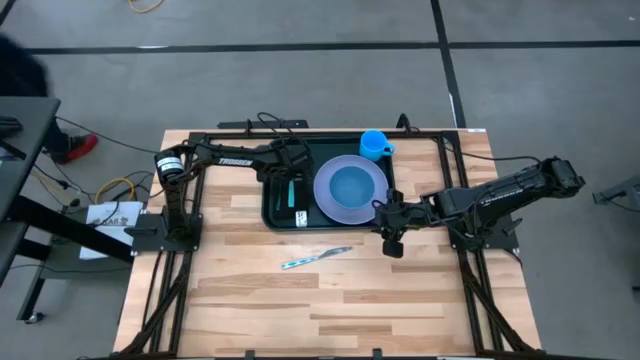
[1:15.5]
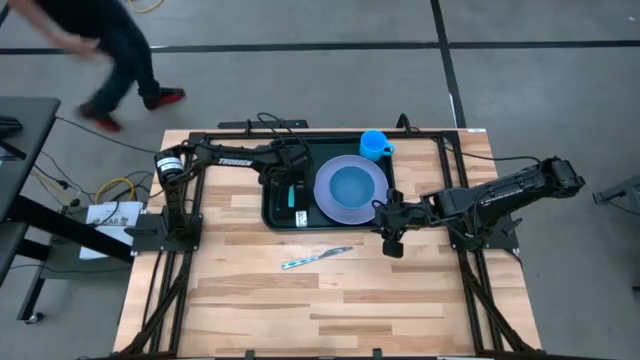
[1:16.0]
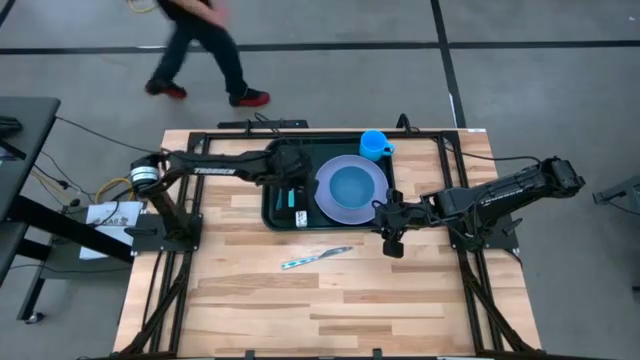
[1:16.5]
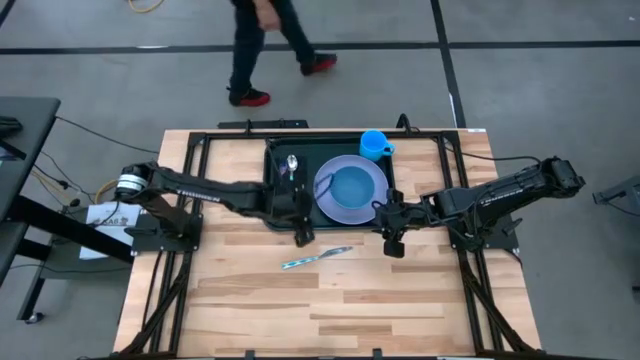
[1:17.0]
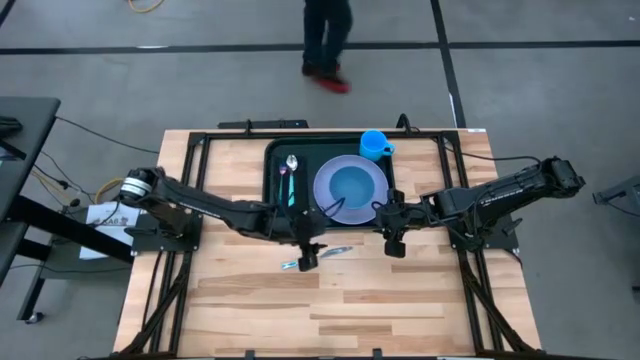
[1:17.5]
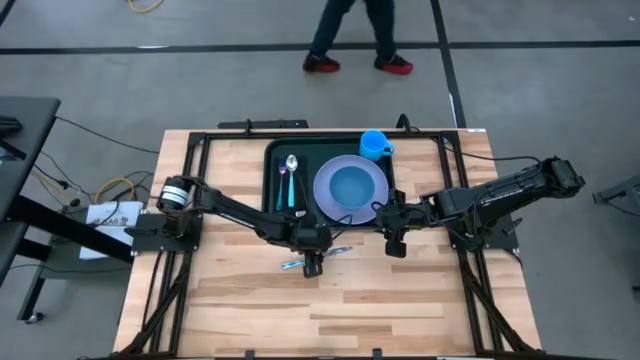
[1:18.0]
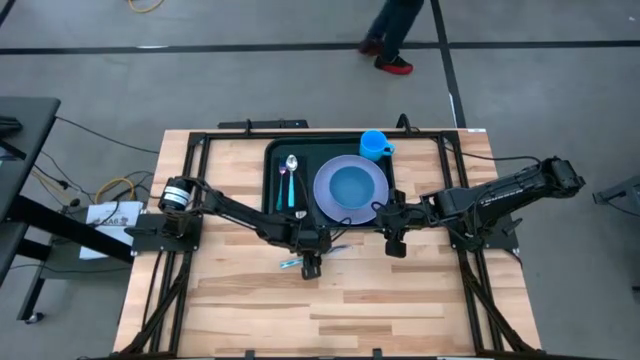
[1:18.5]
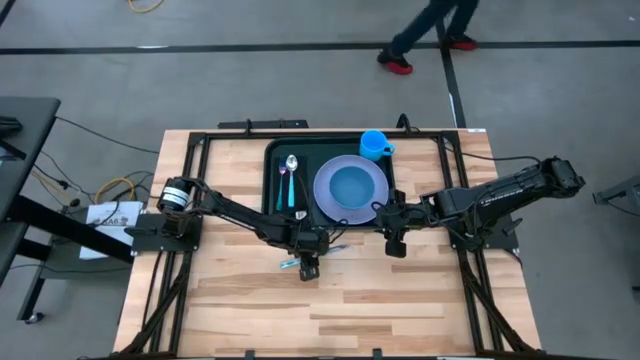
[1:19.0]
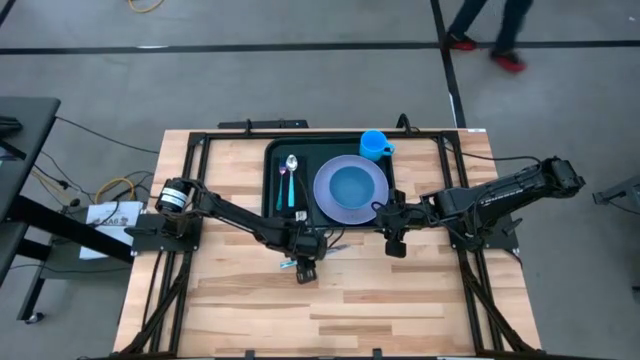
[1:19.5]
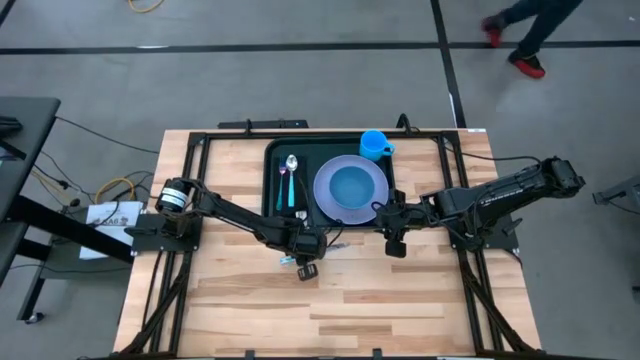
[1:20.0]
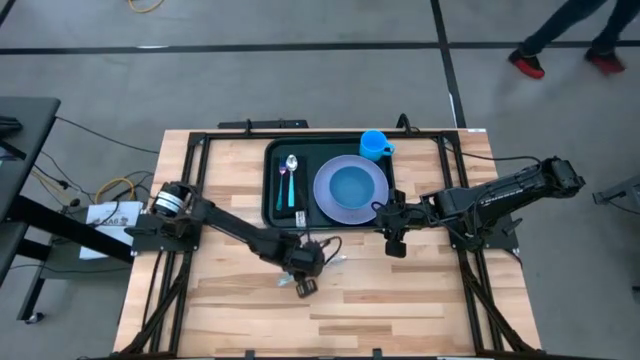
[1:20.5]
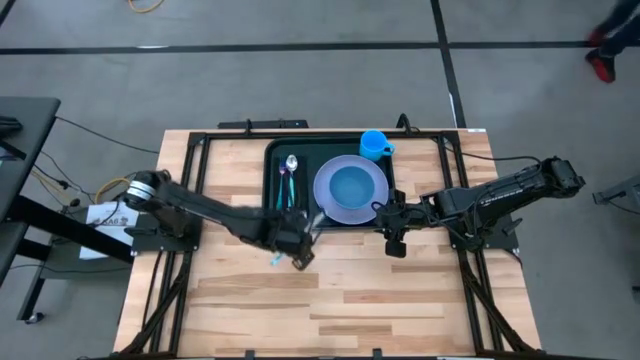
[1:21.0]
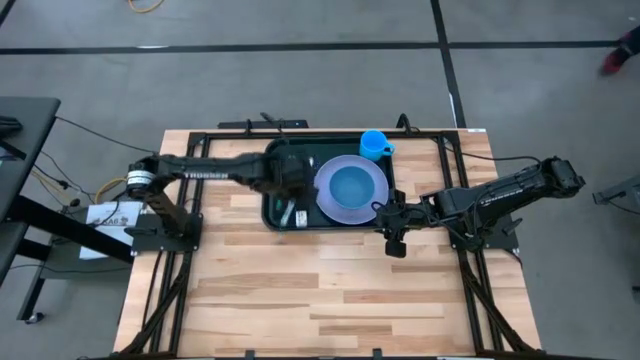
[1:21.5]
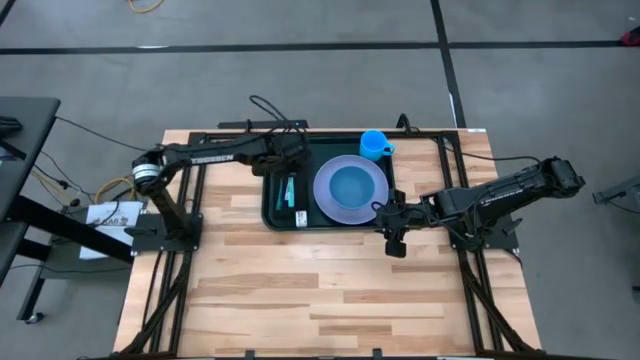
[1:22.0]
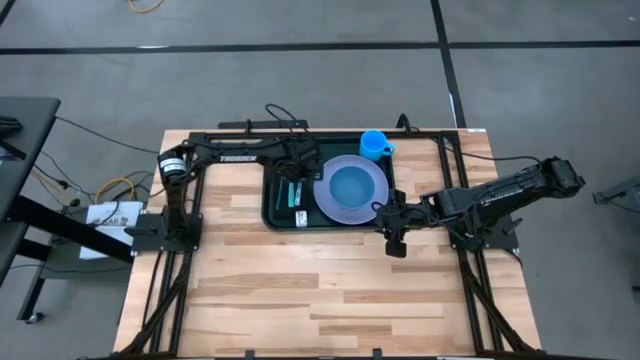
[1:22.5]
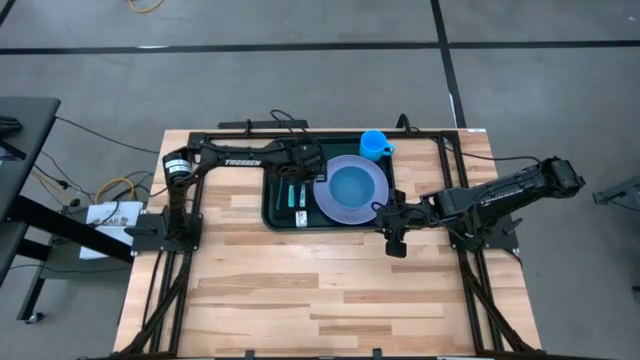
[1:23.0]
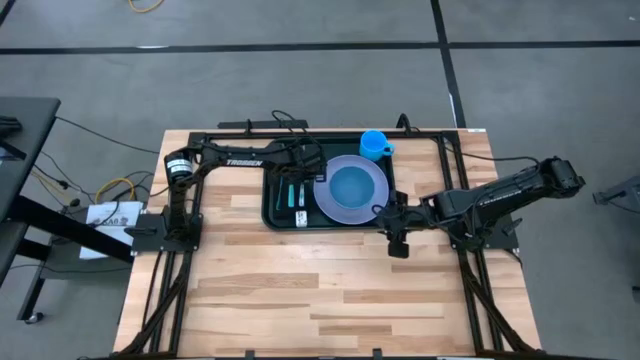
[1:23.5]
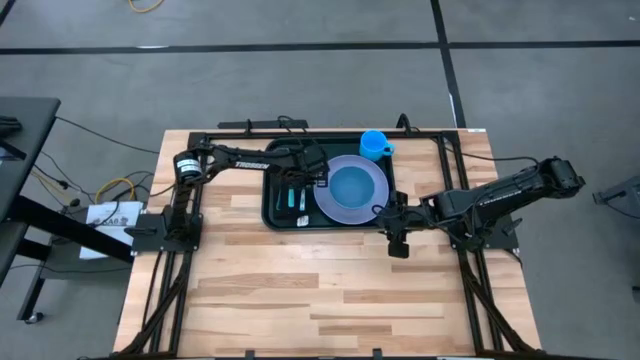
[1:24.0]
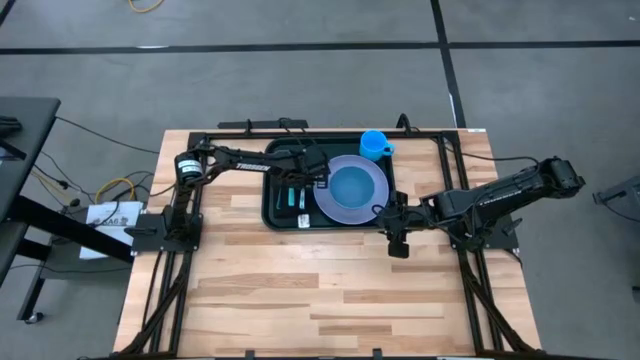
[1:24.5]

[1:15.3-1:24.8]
Task: Set up tray
Put the light blue knife to the right of the light blue spoon on the black napkin

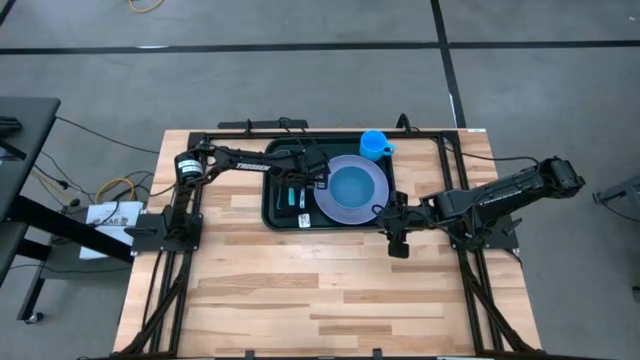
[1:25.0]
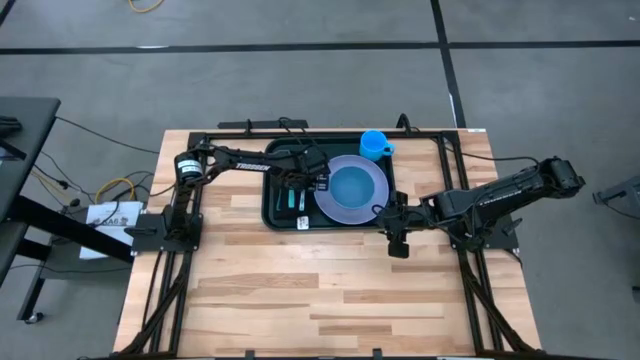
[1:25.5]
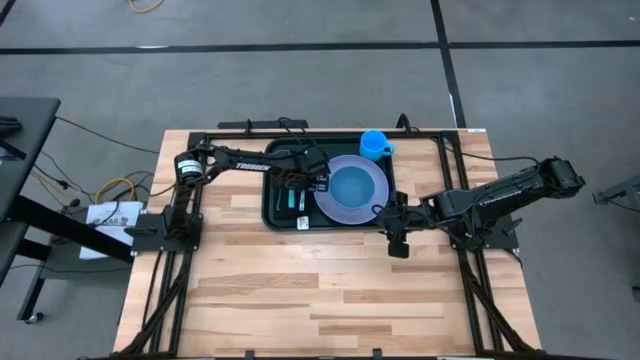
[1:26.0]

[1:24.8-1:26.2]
Adjust the black napkin on the black serving tray

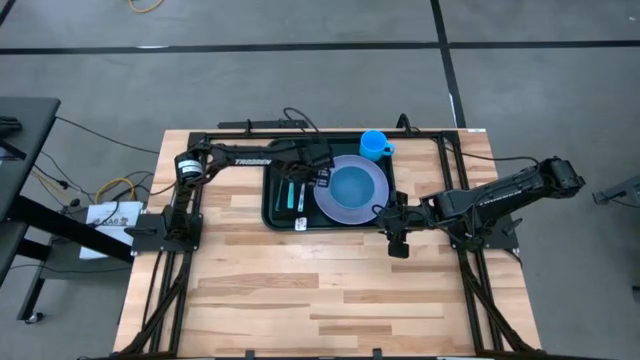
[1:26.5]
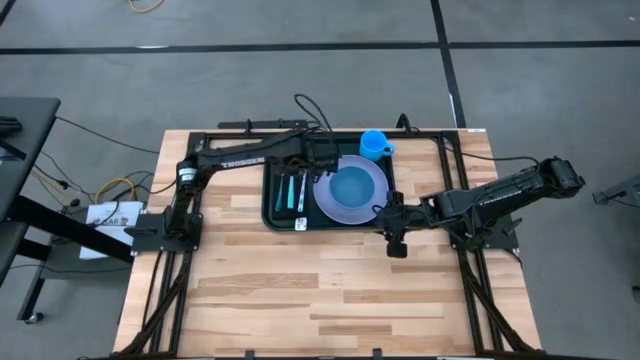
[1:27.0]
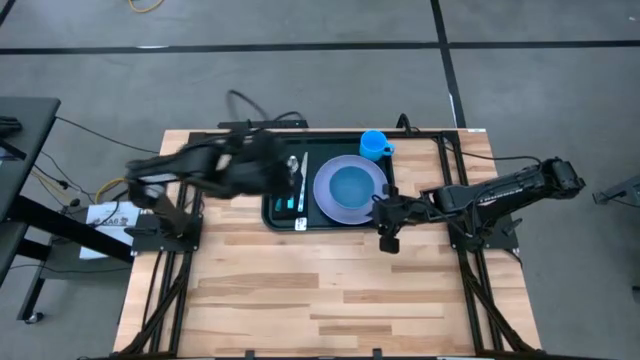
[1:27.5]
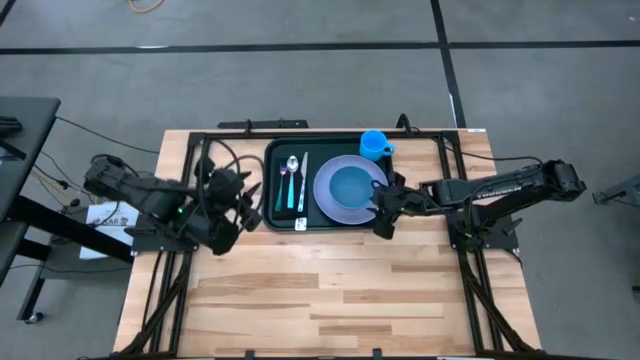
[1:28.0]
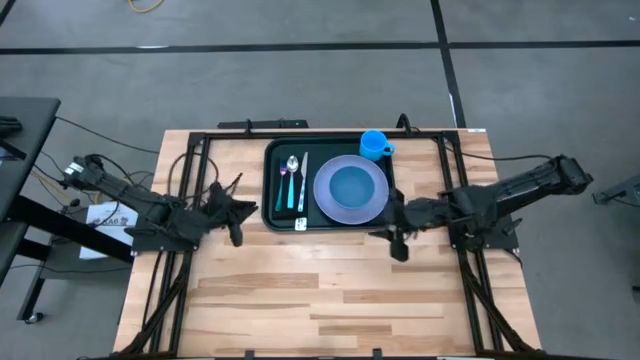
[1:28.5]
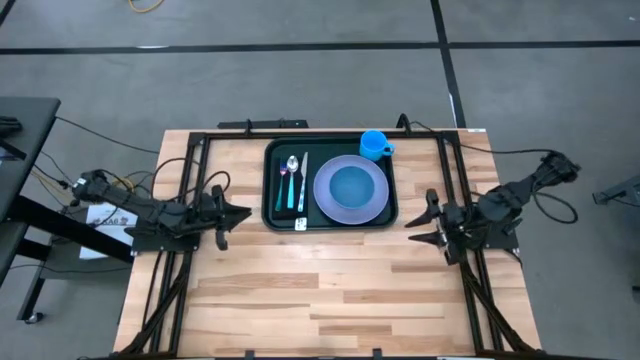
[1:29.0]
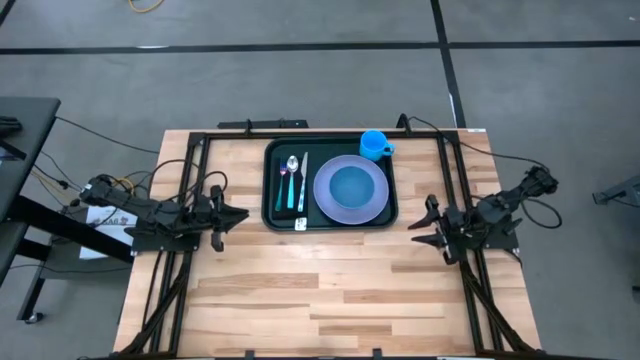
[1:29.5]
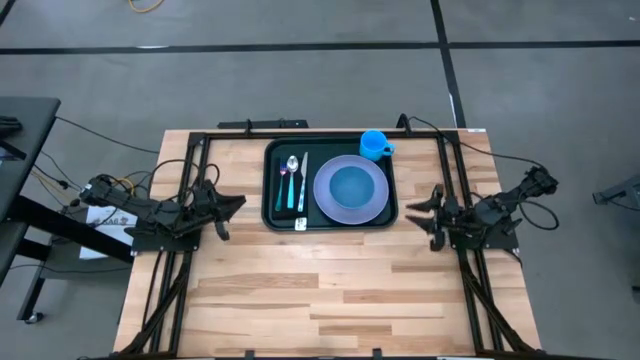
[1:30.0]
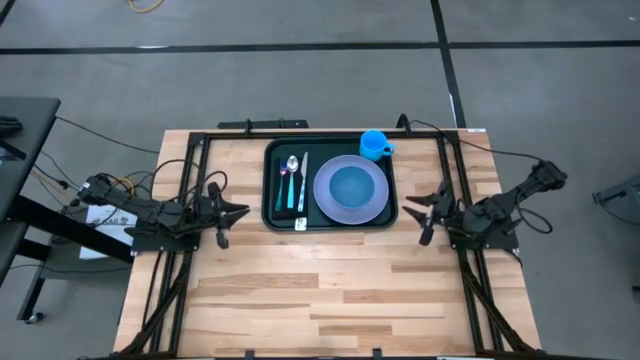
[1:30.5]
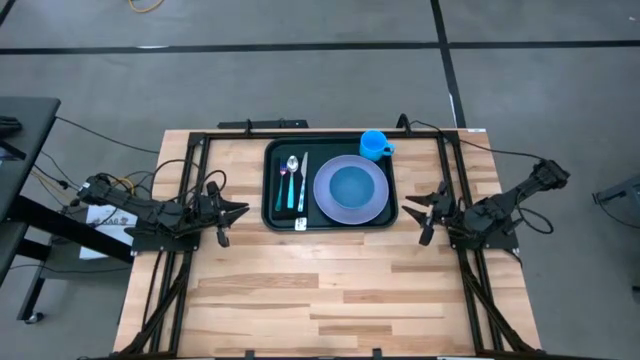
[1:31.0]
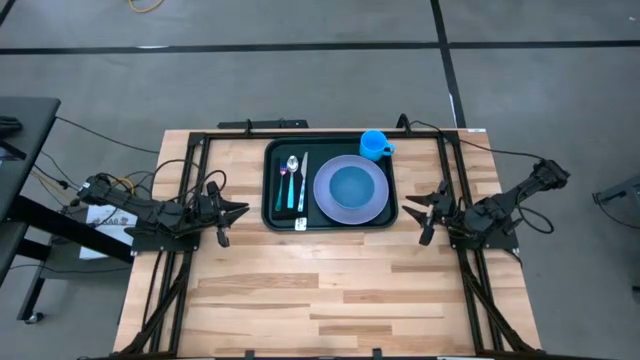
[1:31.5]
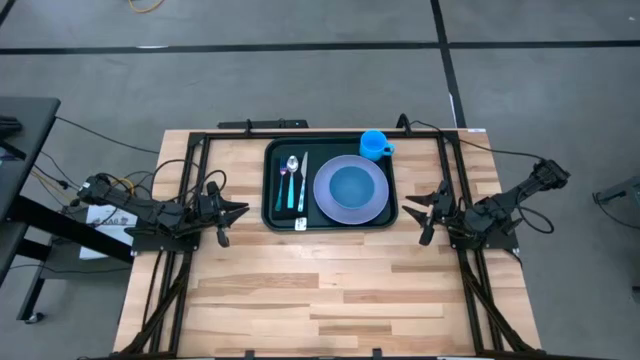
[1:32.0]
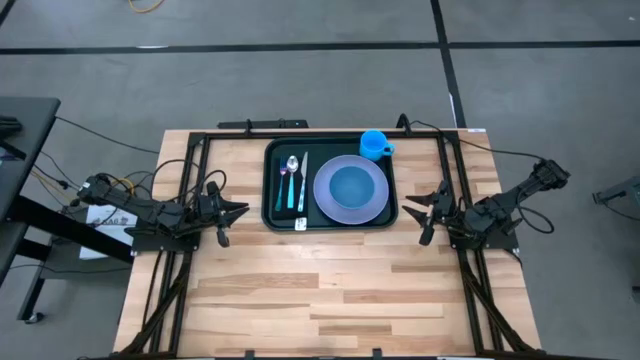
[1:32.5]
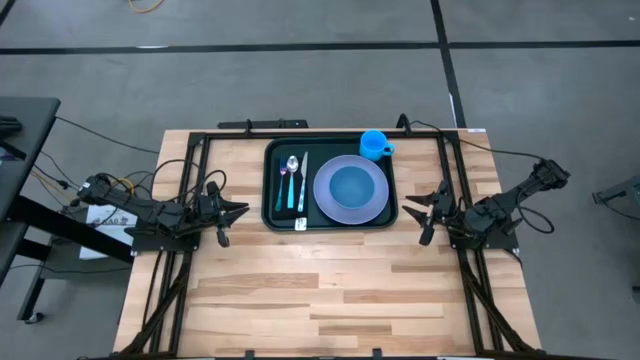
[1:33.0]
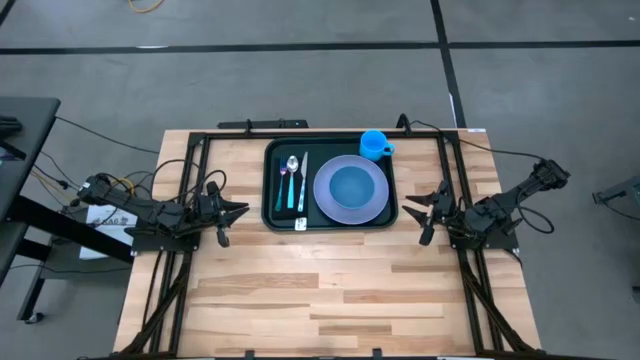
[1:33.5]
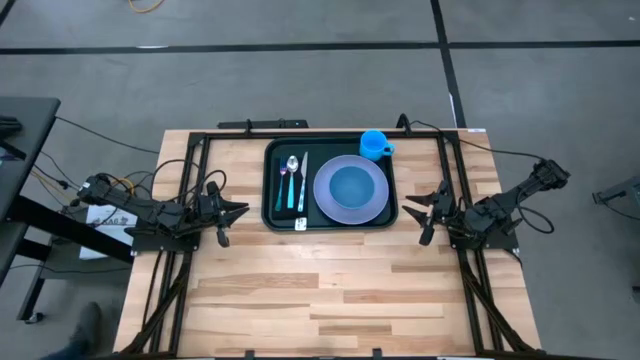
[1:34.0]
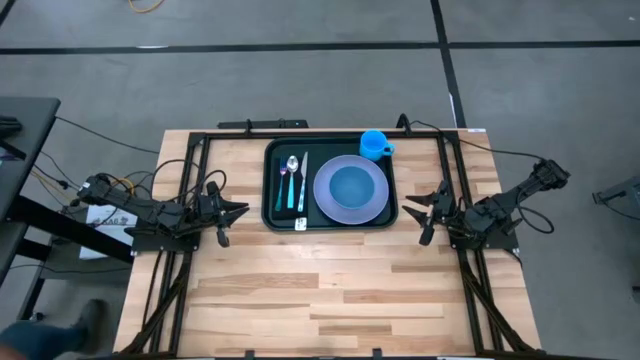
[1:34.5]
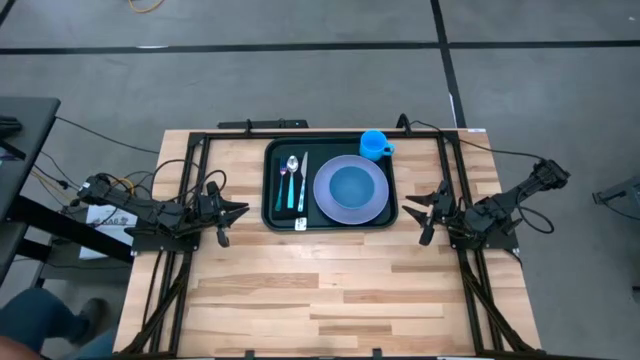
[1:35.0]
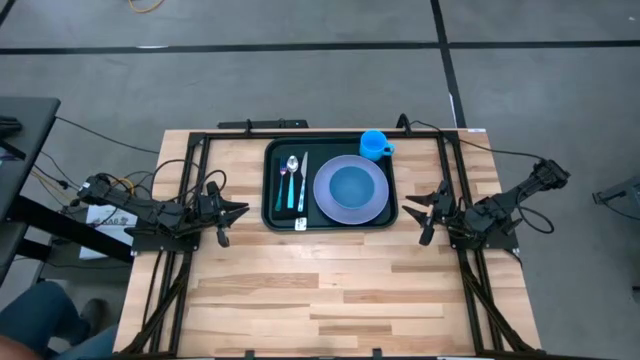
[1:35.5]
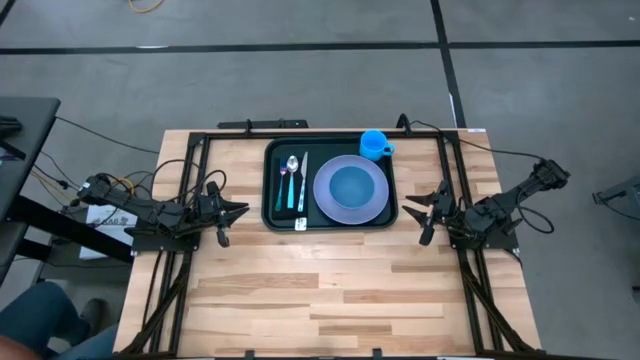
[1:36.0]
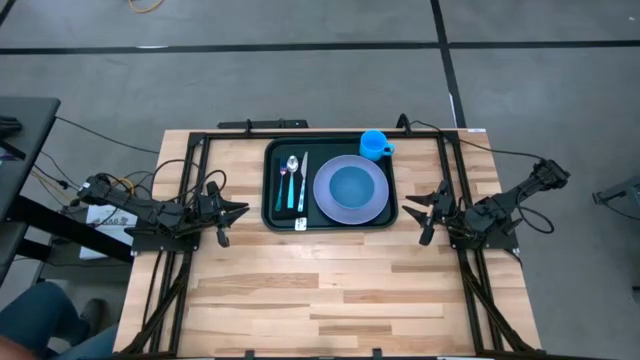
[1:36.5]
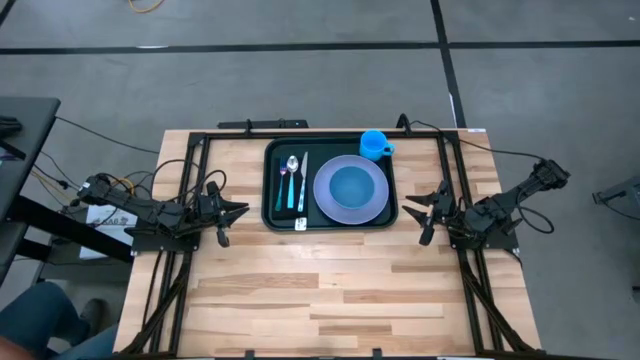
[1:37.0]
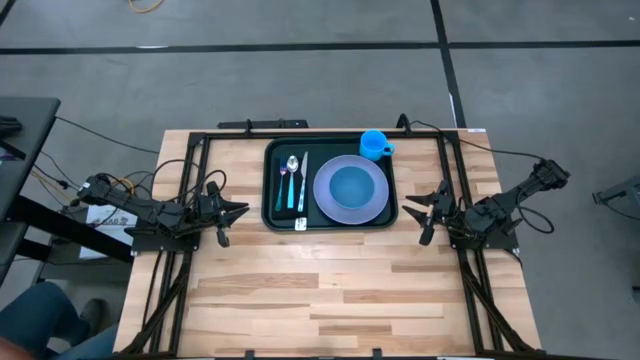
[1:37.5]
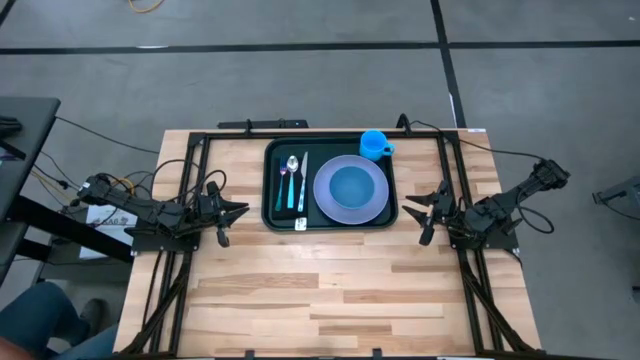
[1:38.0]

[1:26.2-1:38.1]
Return to Home Position
